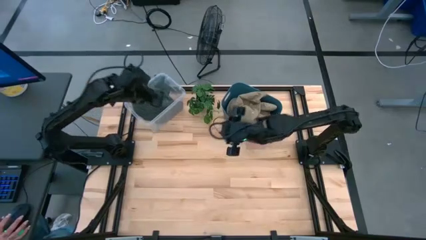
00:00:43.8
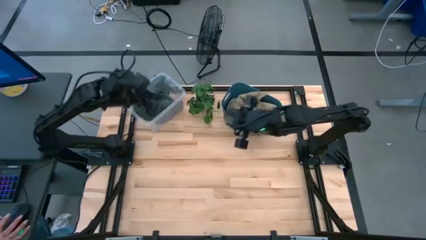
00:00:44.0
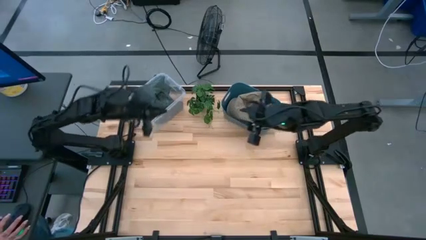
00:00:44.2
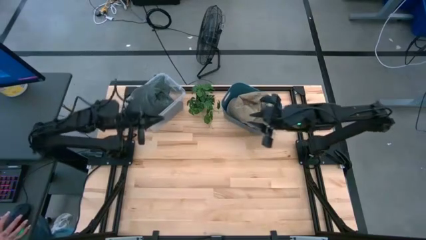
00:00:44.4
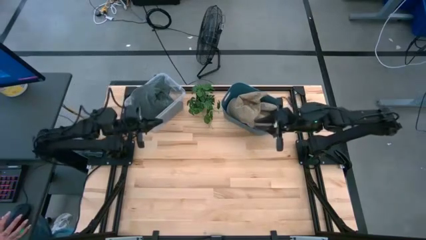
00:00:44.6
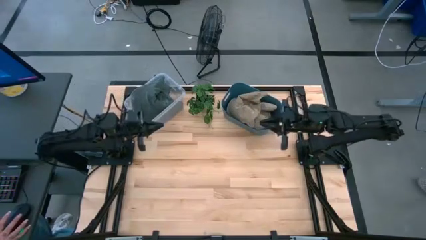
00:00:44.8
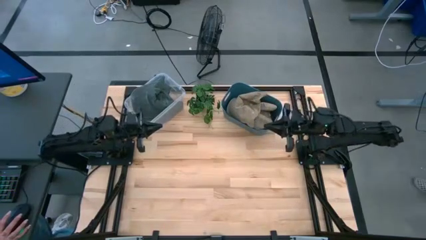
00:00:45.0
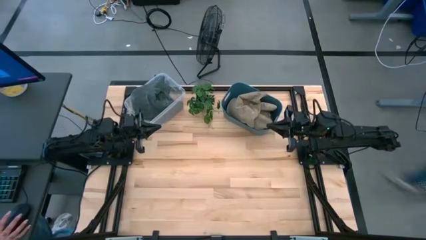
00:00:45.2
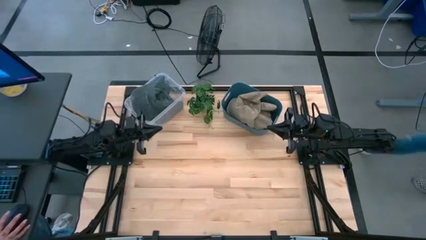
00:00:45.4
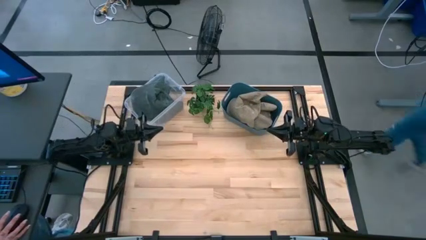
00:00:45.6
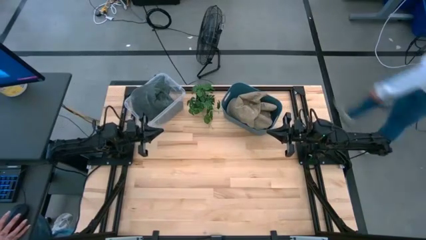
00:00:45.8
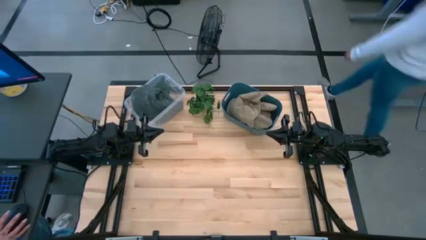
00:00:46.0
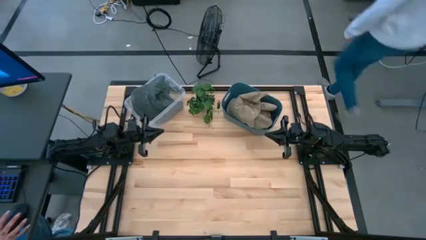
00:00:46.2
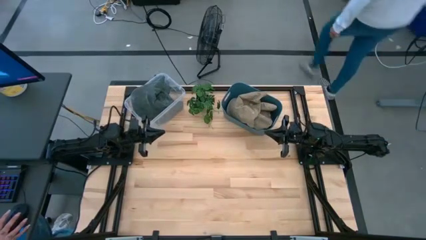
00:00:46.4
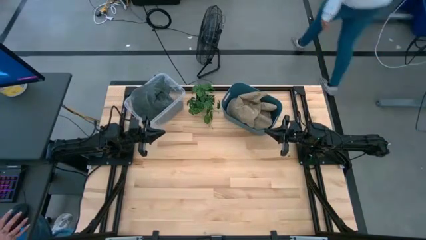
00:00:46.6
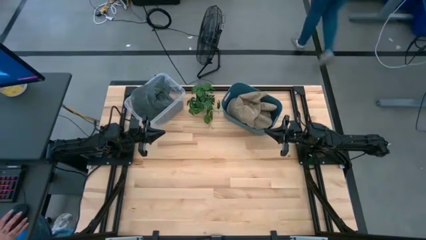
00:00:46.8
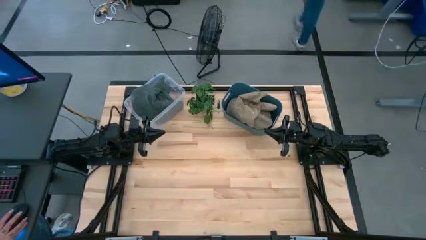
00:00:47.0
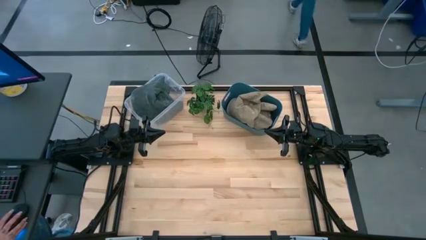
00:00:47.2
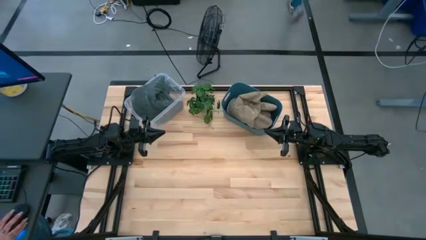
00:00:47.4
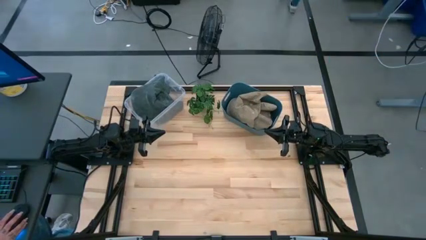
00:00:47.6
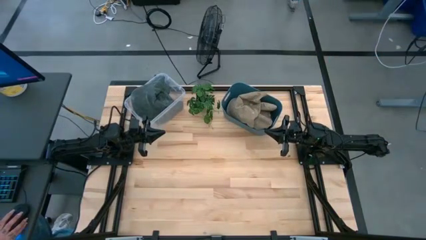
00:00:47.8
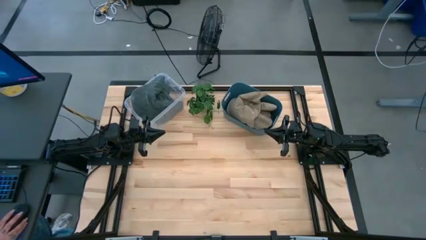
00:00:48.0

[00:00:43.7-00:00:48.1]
Task: Pick & Place hat
Return to Home Position

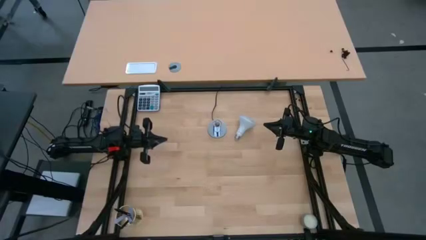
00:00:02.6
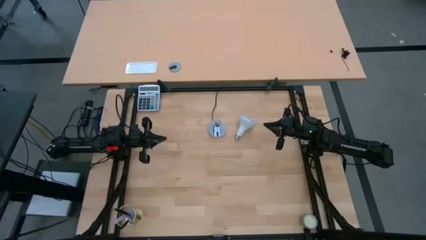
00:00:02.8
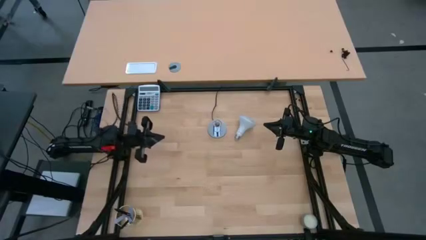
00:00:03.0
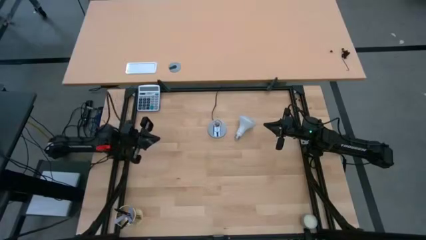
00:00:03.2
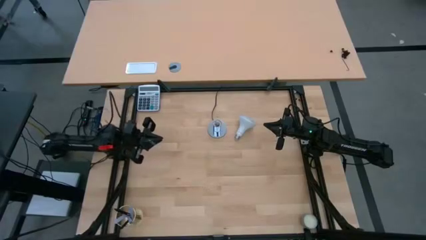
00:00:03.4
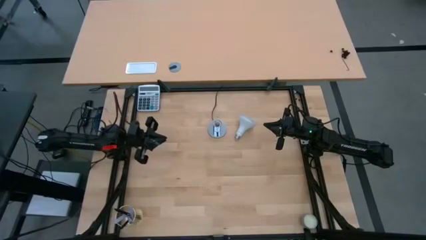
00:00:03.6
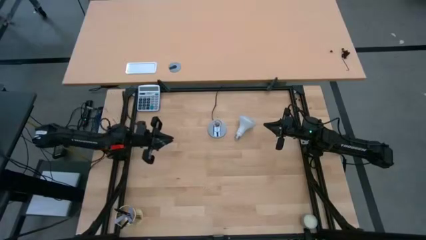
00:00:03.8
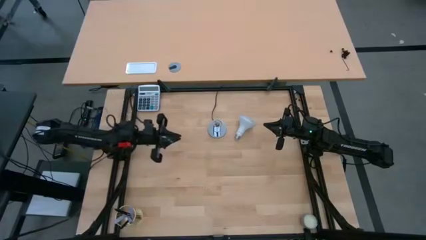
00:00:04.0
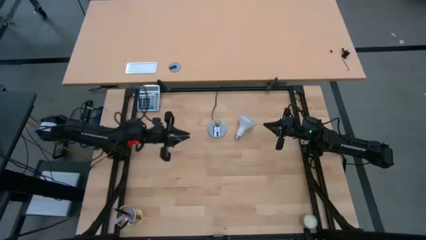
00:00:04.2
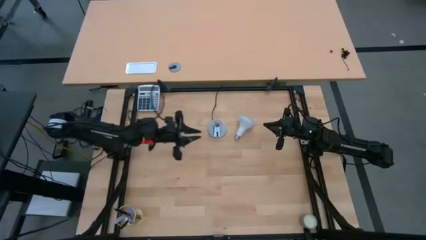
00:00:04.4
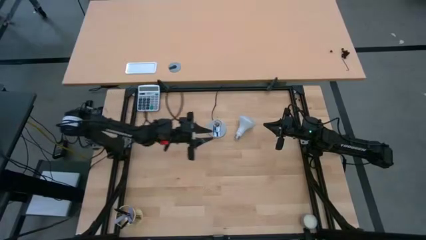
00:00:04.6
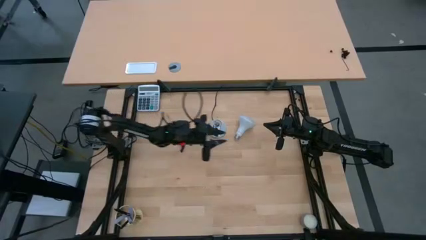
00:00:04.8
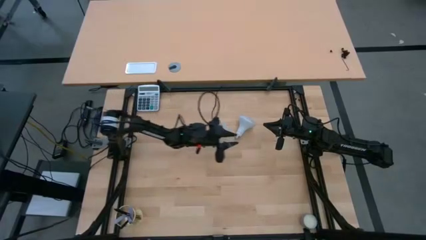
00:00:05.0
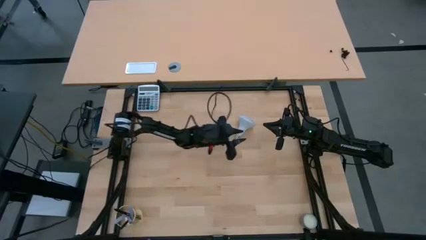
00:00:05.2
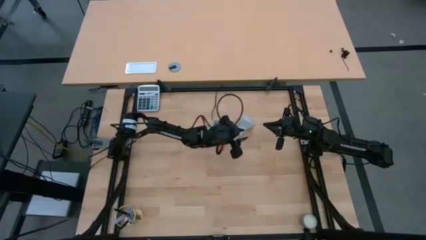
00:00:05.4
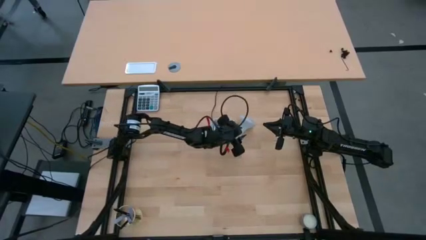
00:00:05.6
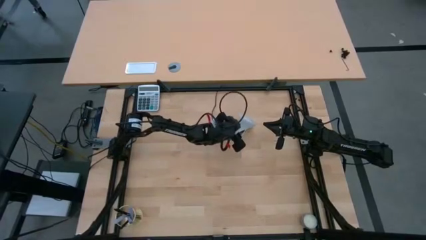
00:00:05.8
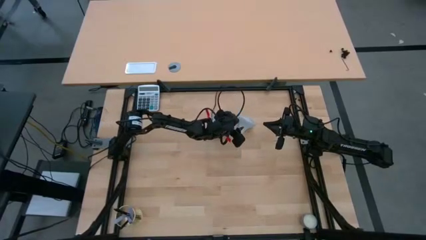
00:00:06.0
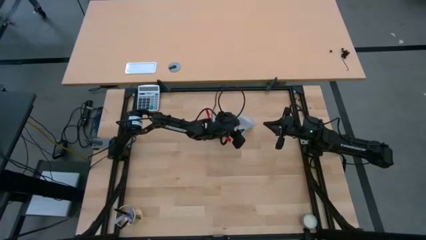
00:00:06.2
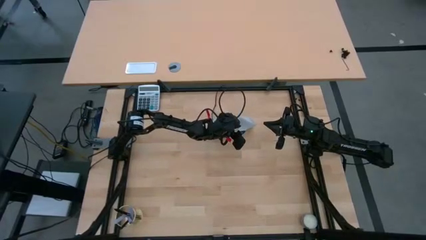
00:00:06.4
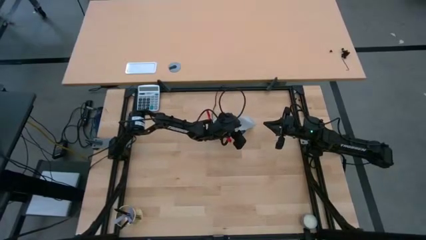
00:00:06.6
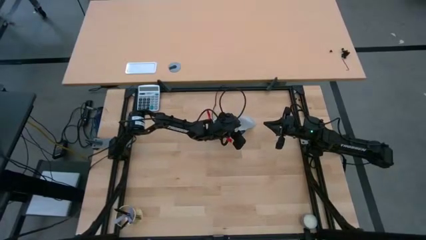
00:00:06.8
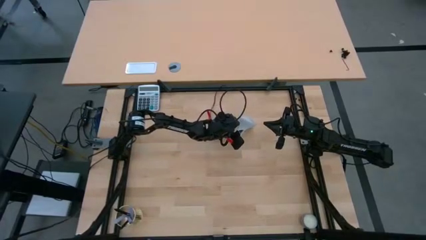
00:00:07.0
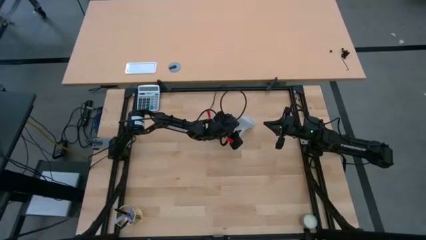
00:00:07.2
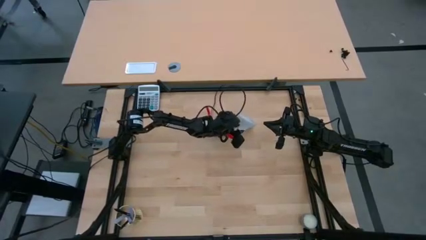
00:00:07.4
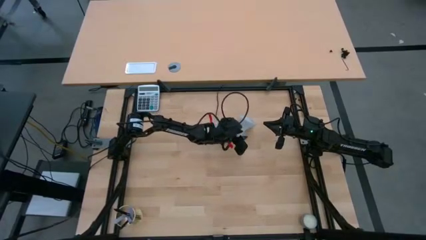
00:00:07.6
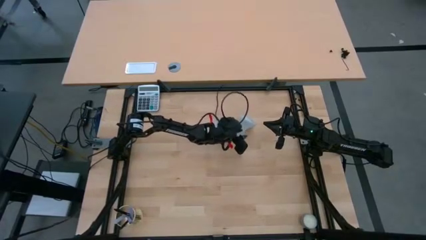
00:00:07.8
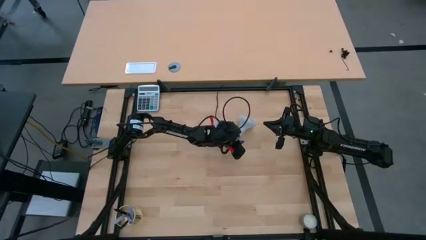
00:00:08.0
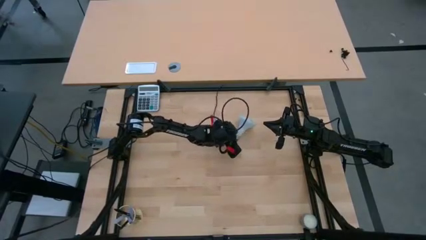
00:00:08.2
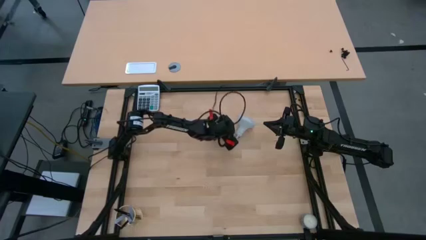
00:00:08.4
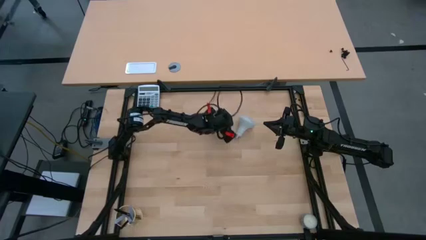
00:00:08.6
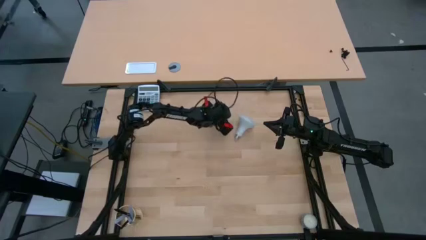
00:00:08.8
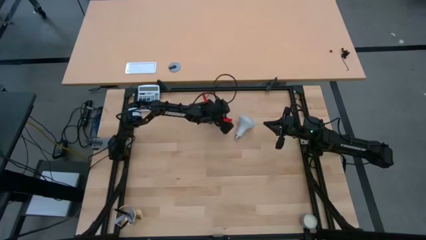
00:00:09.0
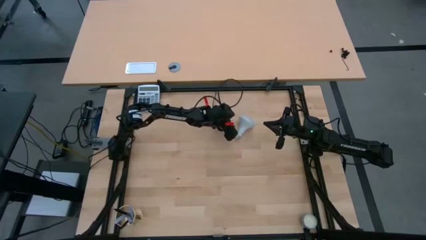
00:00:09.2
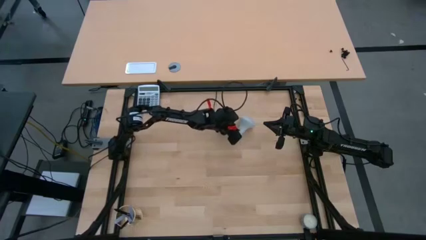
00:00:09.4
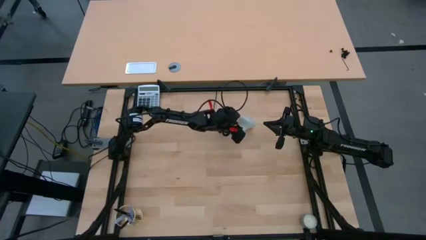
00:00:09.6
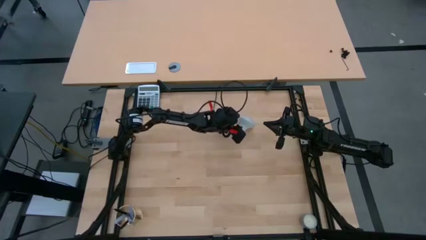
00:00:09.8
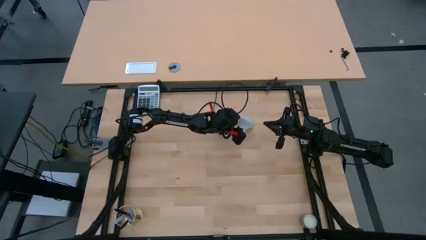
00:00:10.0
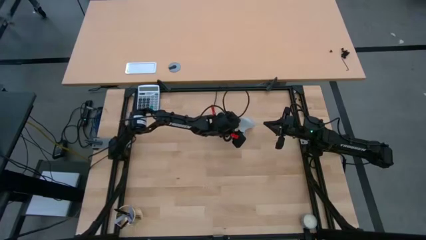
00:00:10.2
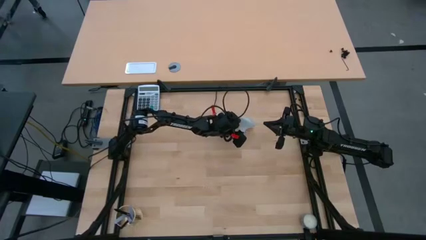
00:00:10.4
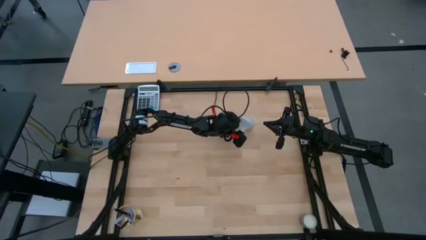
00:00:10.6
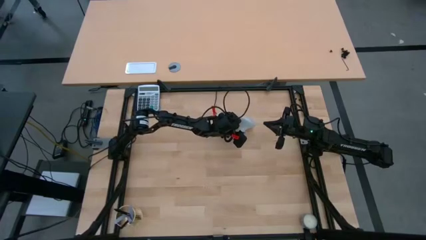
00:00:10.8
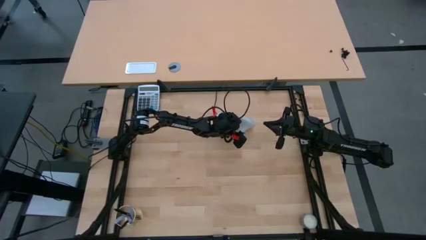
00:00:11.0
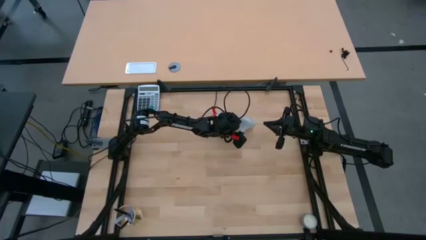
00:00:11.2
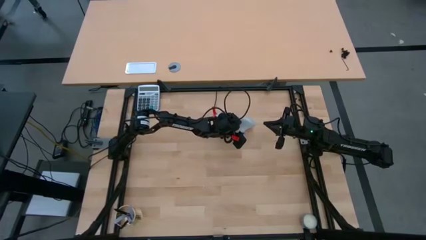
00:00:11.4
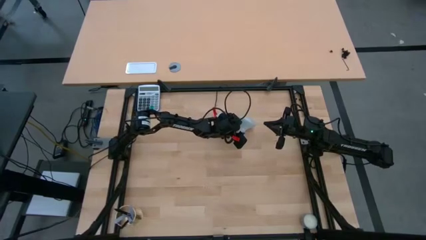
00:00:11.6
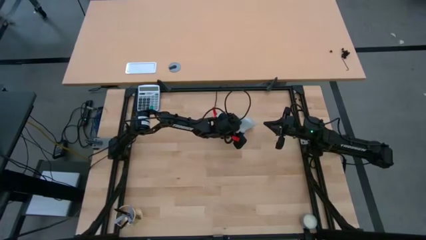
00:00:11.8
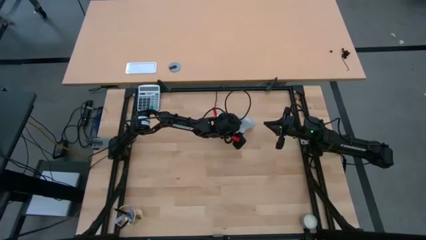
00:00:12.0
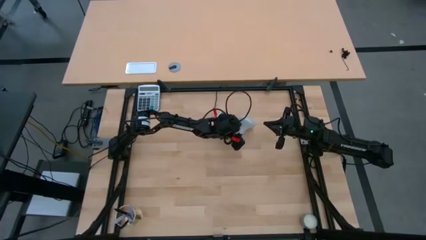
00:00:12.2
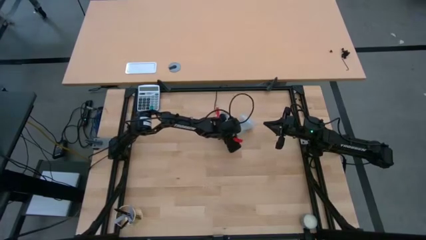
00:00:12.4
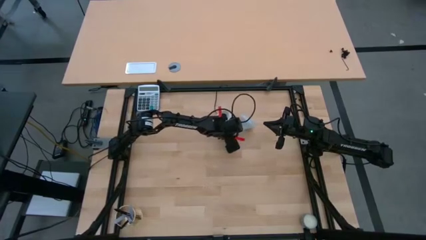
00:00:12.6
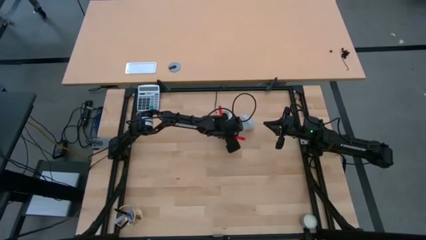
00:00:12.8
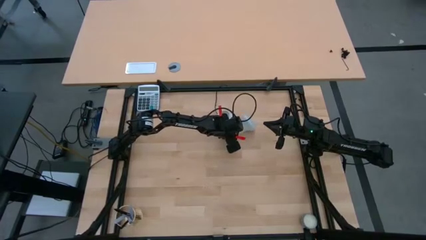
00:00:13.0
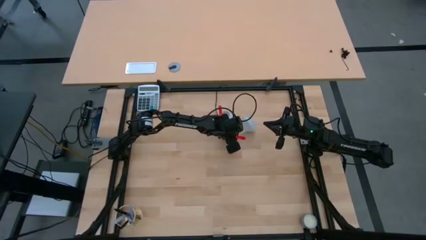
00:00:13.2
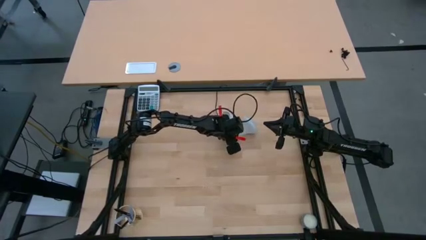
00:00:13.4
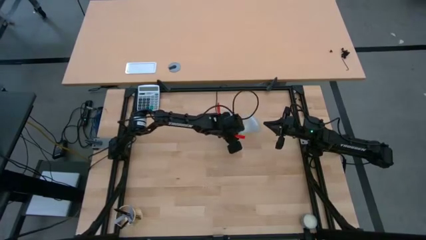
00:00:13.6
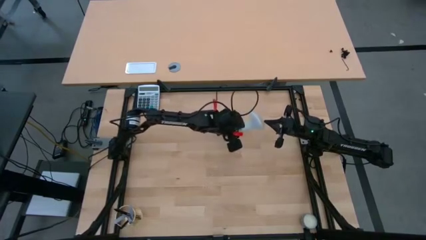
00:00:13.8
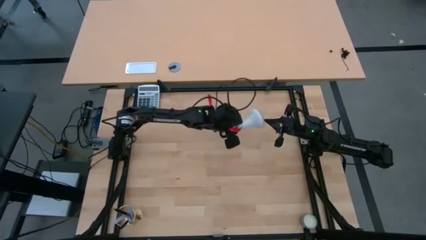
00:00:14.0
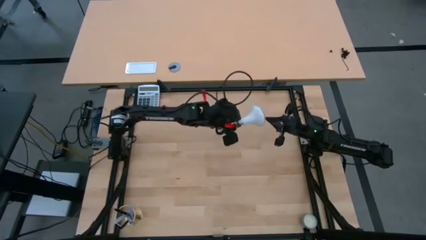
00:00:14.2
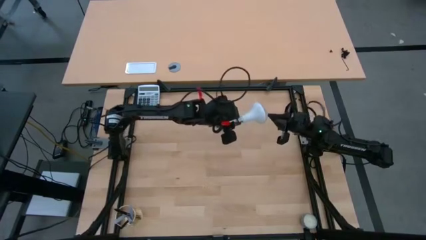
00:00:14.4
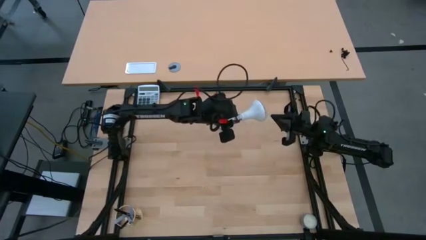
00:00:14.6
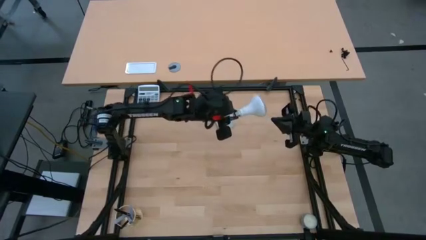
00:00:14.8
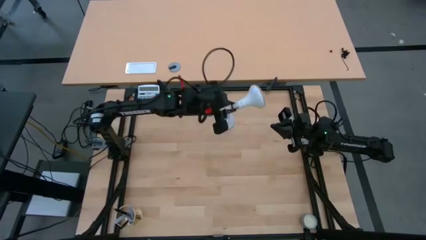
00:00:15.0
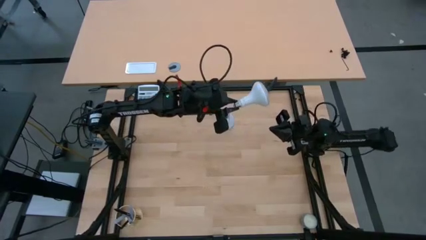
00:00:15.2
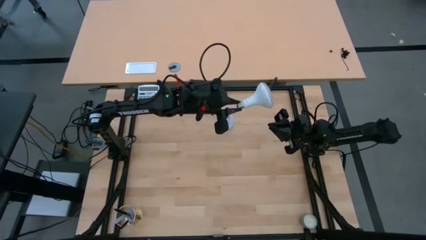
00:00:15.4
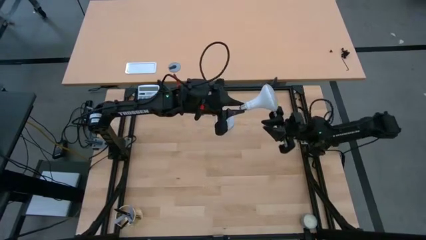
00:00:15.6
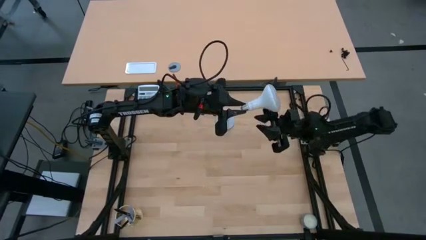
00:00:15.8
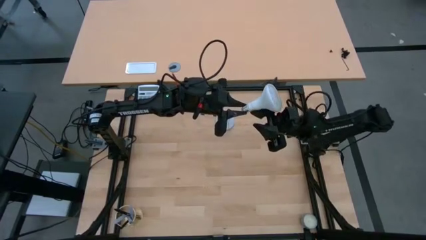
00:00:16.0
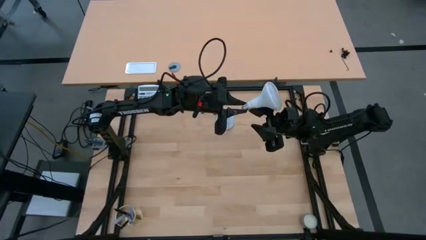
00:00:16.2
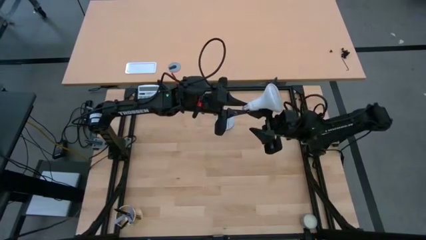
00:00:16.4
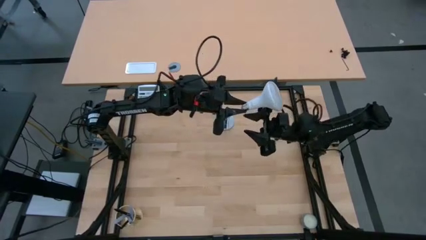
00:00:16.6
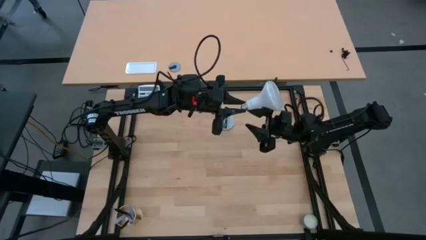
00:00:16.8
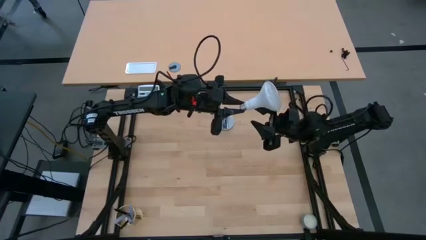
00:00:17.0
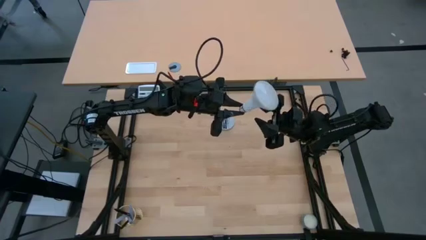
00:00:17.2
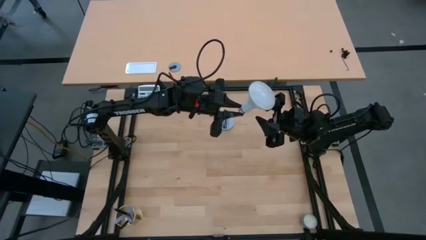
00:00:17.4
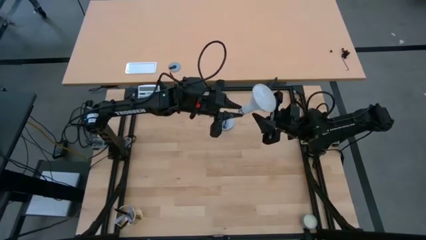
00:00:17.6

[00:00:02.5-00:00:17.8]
Task: Screw lightbulb
Insert the lightbulb into the lamp
